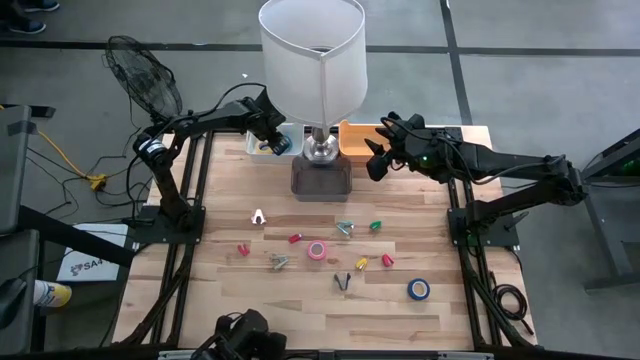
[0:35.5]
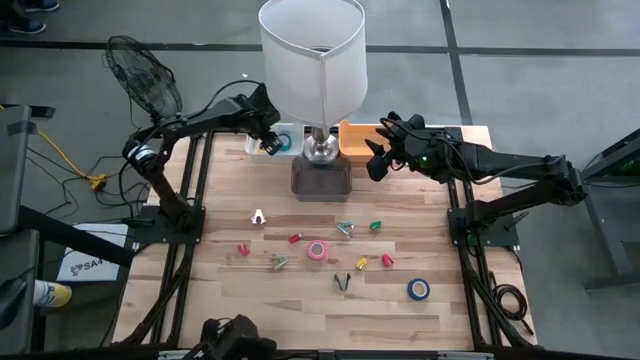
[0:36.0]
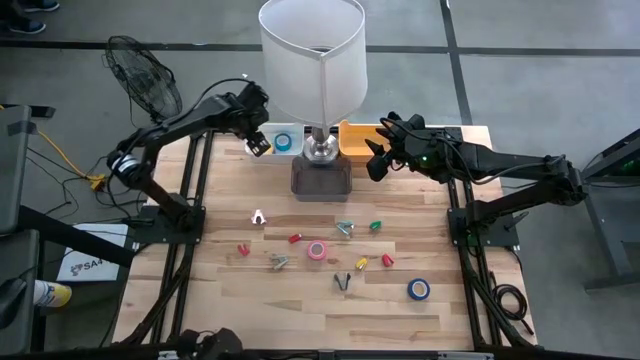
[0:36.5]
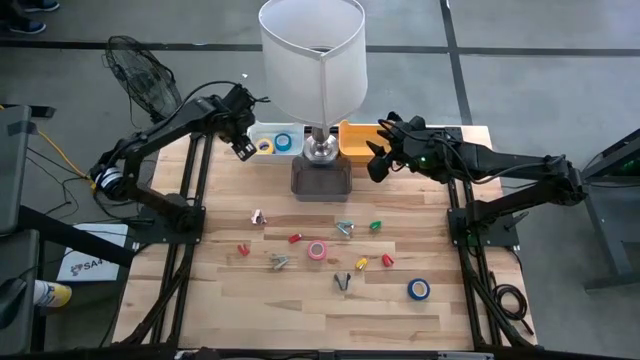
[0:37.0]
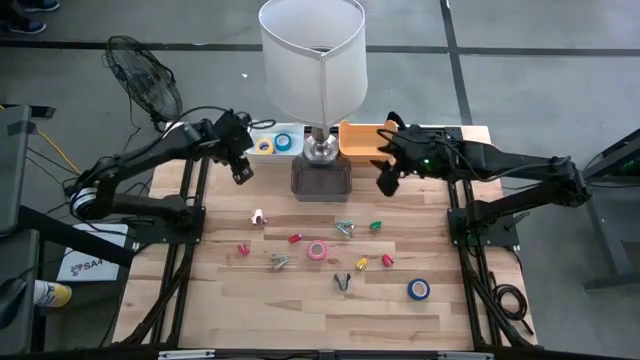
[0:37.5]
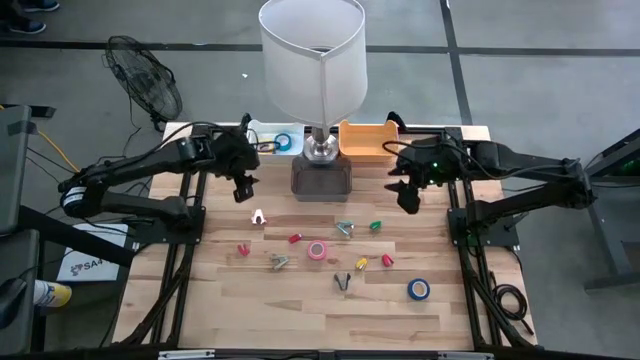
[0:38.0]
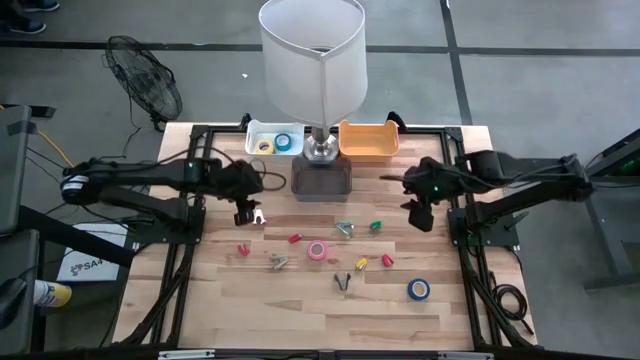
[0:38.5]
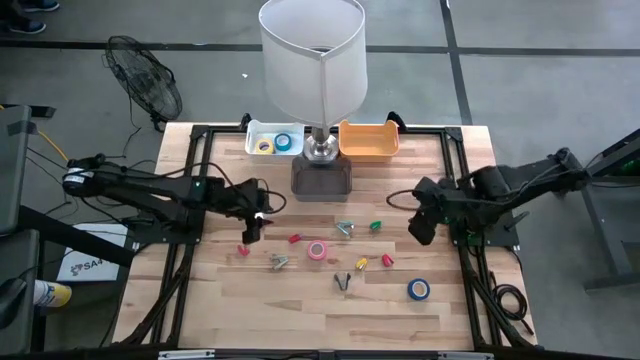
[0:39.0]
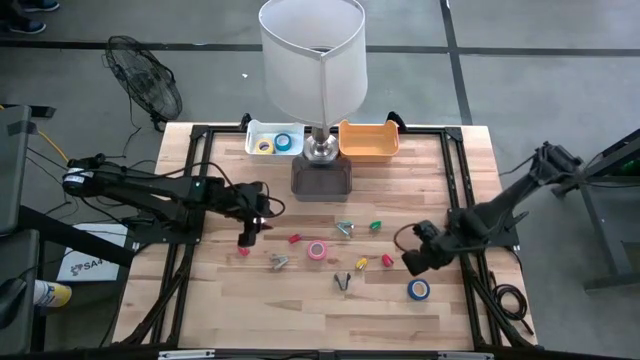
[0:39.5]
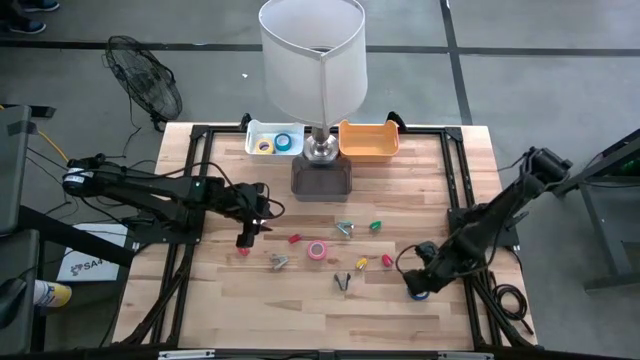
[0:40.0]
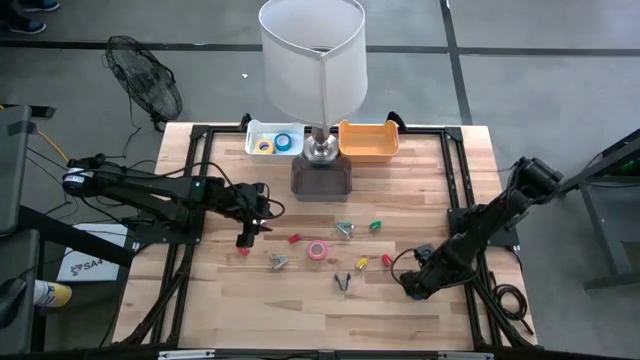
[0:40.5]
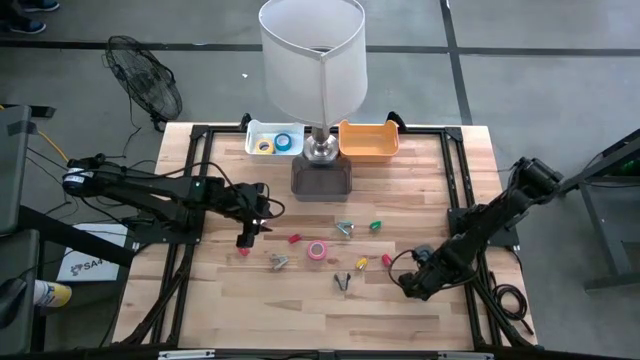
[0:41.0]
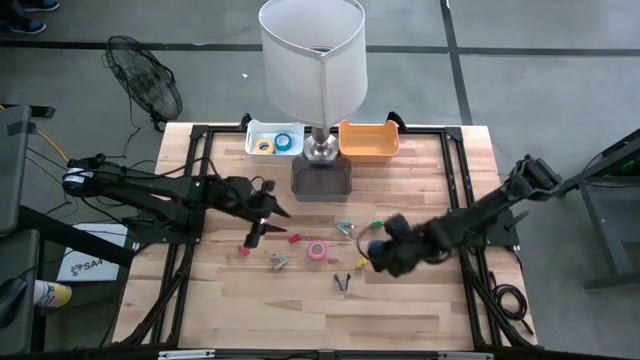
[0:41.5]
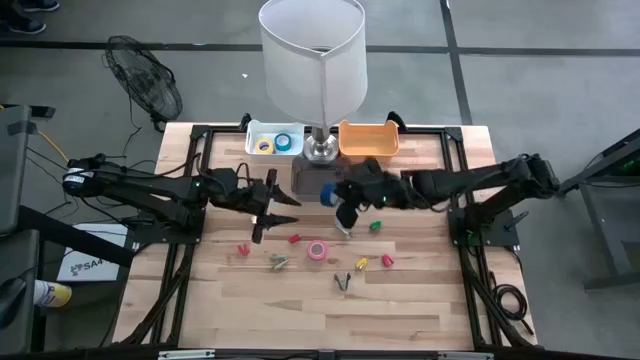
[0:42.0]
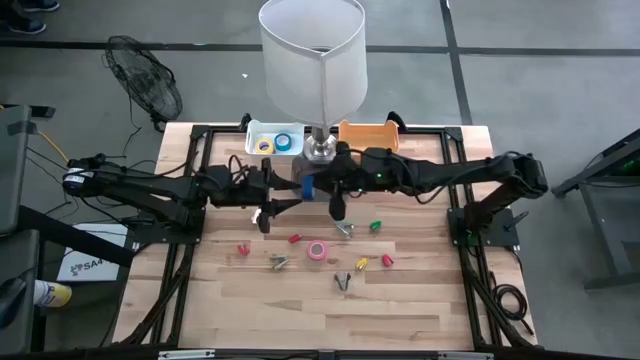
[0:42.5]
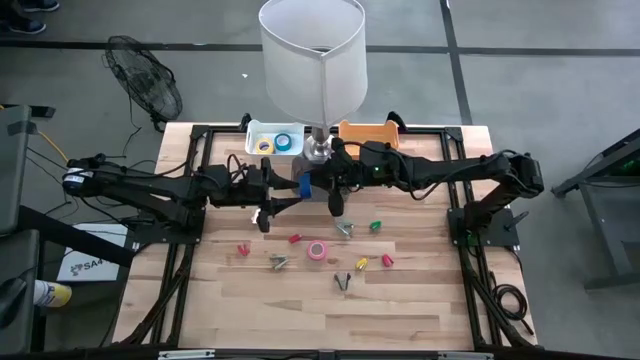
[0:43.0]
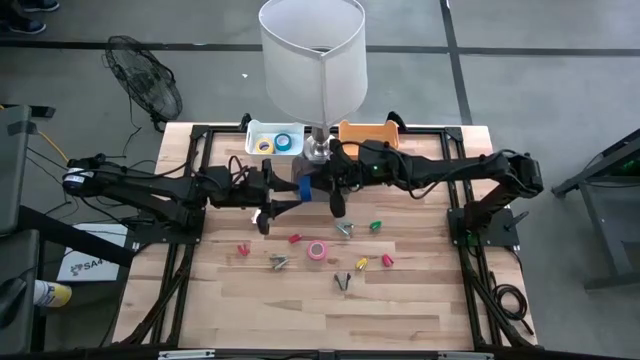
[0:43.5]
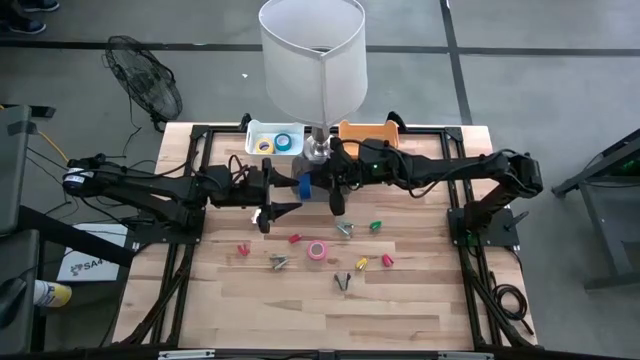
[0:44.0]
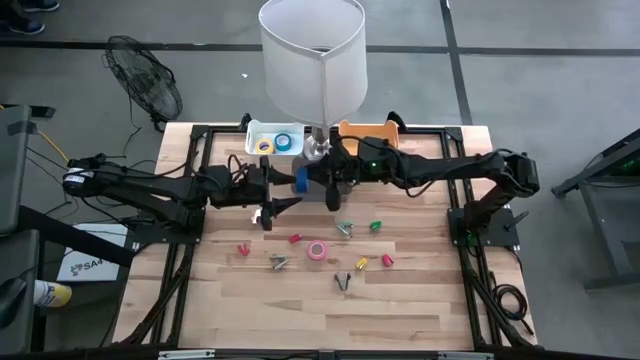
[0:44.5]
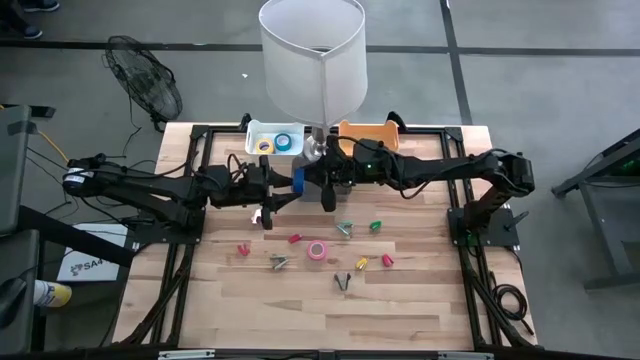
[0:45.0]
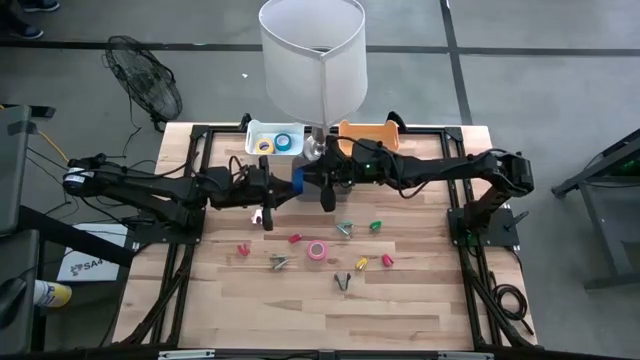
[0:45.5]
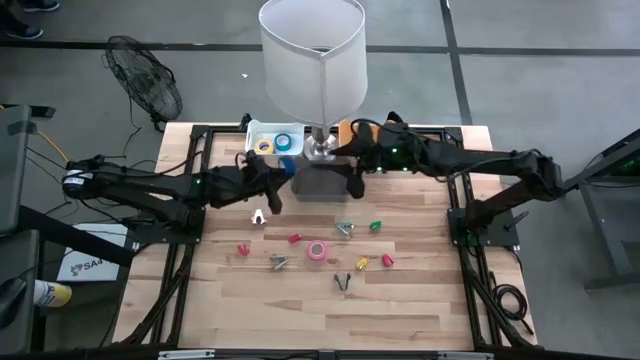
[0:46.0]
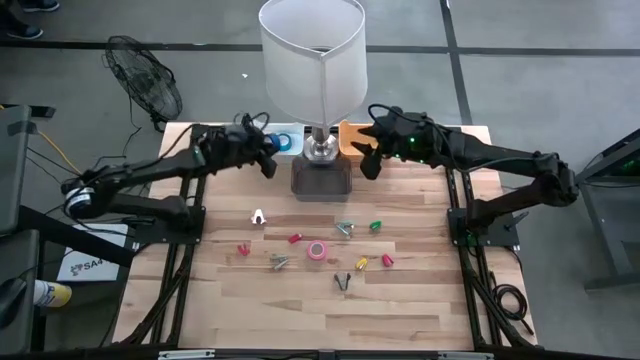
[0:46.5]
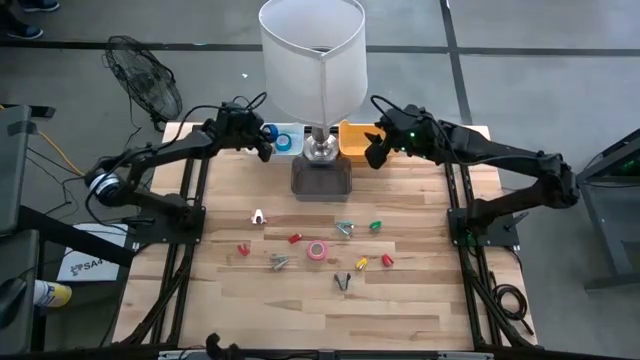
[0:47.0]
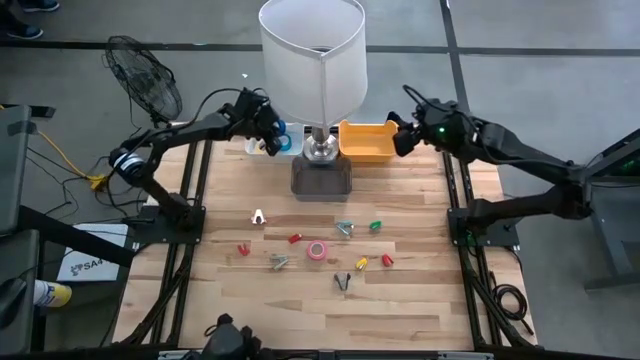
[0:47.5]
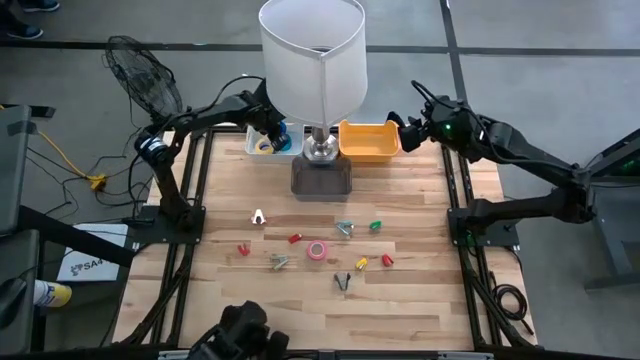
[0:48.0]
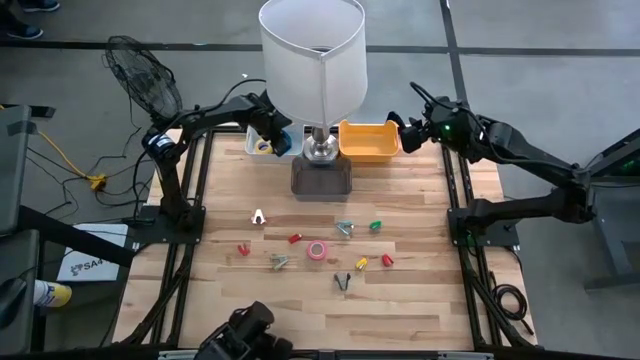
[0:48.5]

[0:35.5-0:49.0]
Task: Pick and place Stapler, Stapler remover, tape
Put the blue tape into the white bin

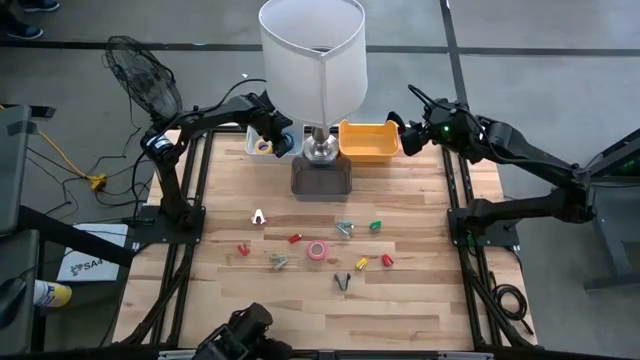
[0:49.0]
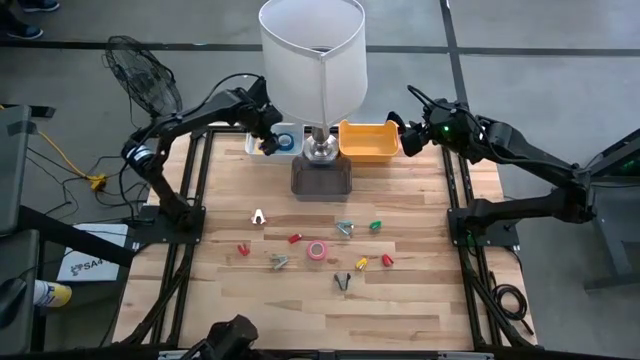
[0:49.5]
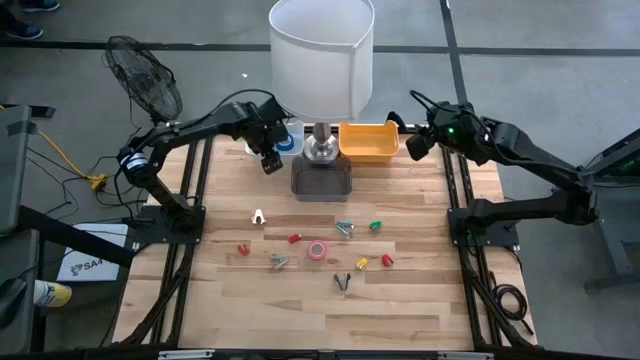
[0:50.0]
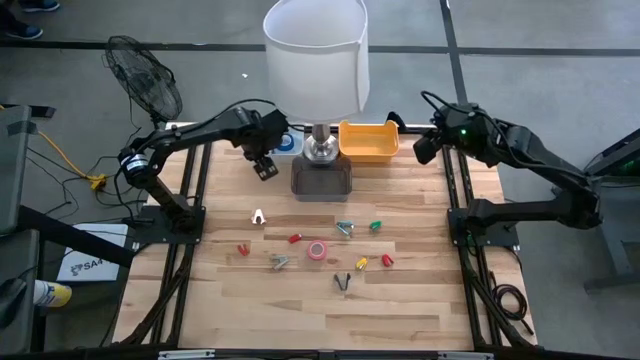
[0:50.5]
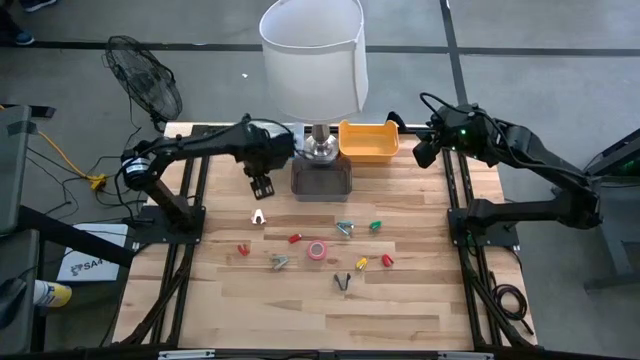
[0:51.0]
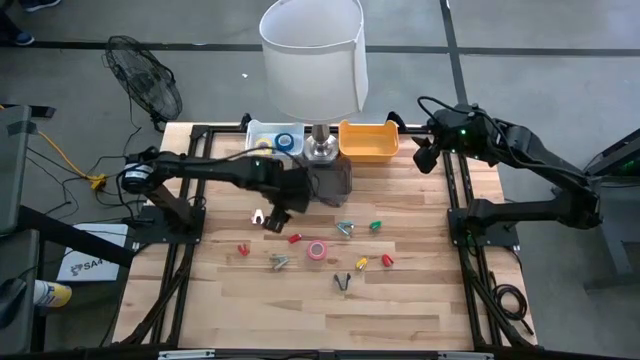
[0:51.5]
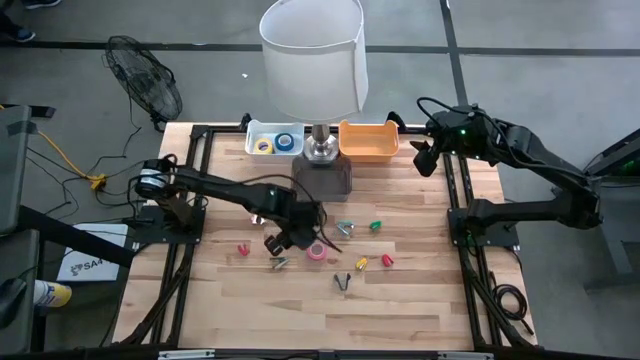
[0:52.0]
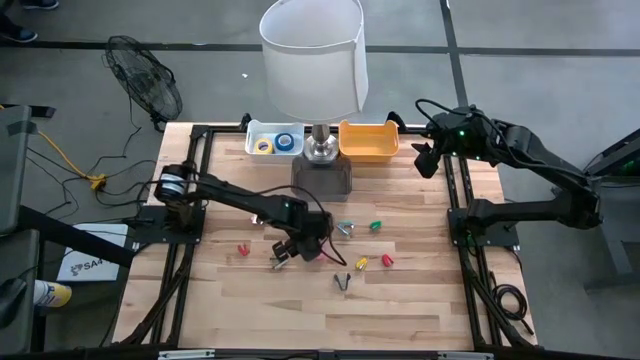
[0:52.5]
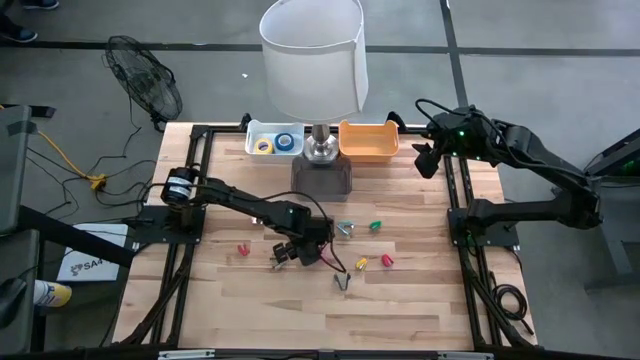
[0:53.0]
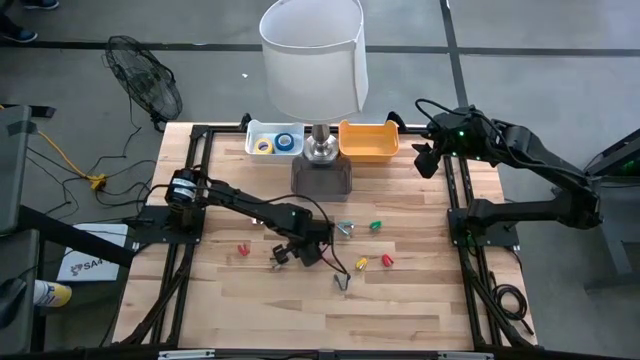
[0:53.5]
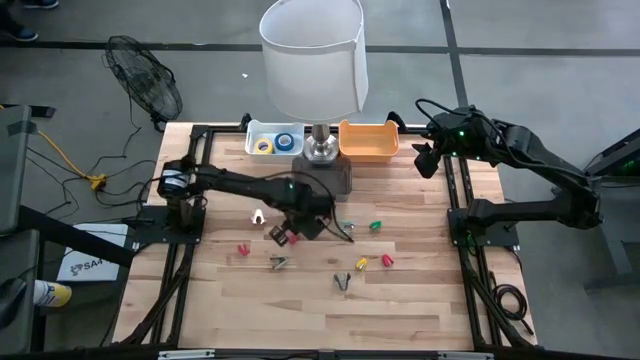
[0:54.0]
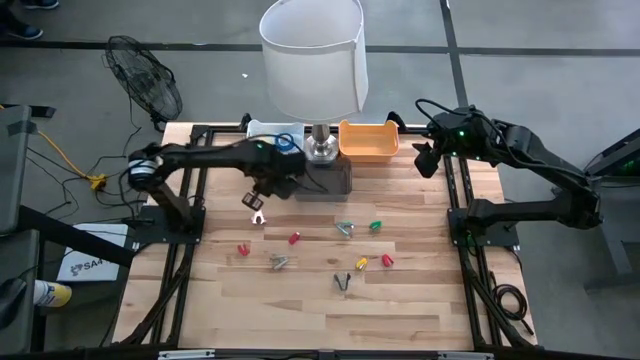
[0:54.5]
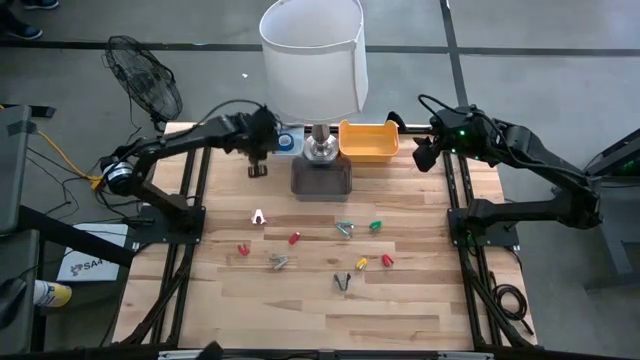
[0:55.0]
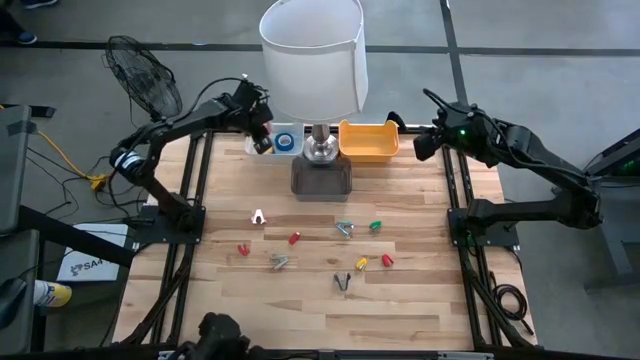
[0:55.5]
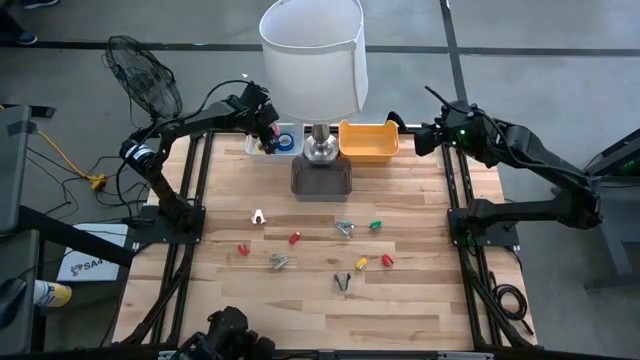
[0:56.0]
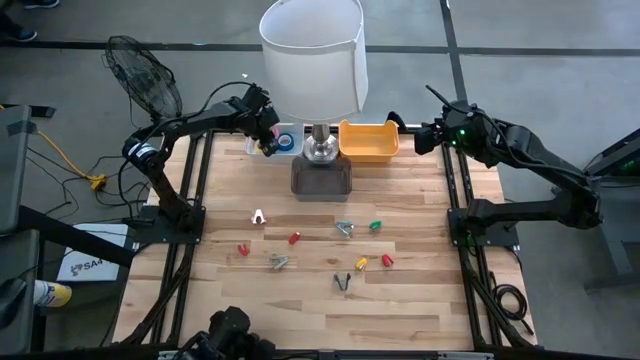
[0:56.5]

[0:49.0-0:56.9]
Put the pink tape into the white bin
